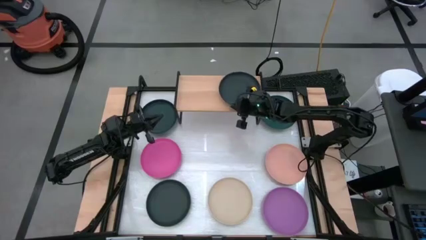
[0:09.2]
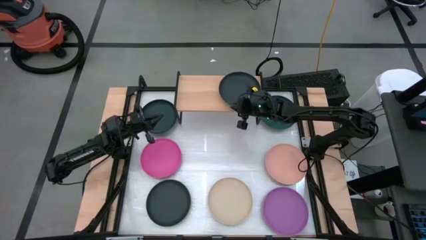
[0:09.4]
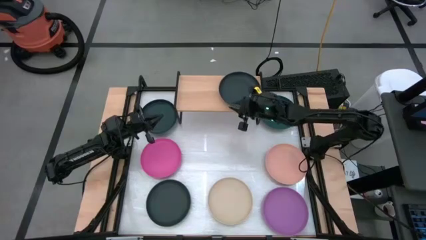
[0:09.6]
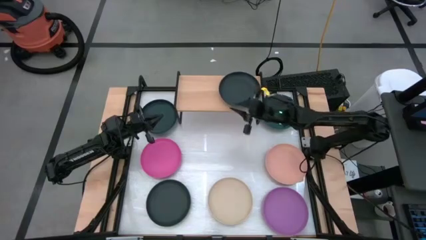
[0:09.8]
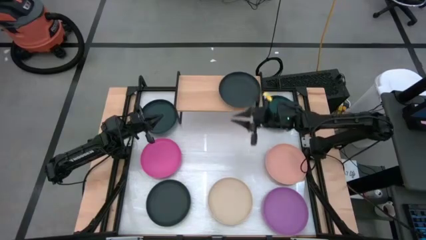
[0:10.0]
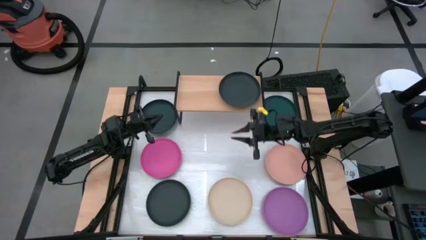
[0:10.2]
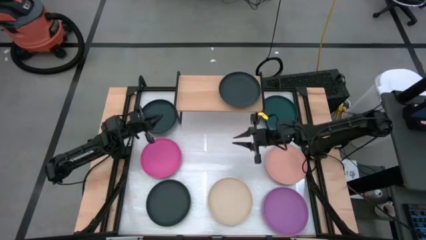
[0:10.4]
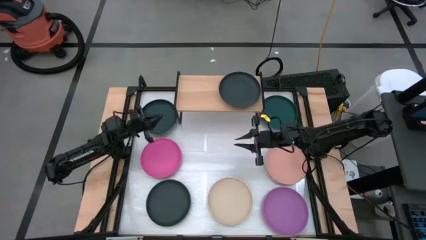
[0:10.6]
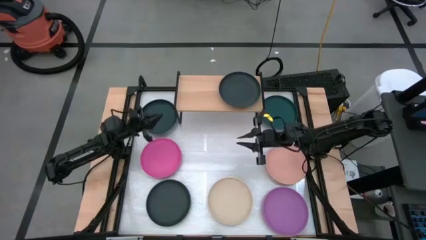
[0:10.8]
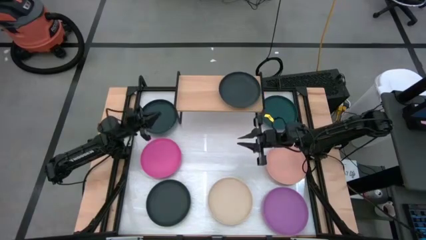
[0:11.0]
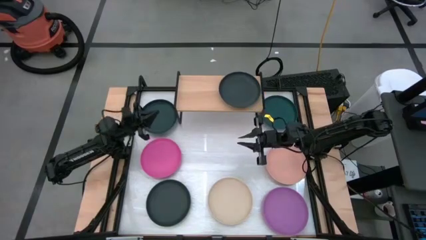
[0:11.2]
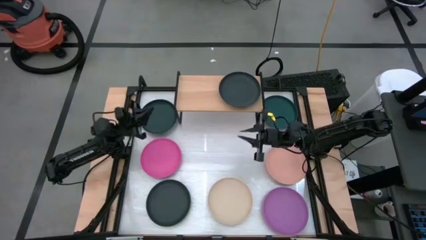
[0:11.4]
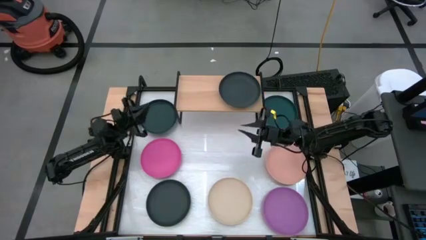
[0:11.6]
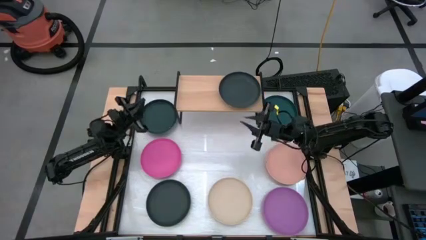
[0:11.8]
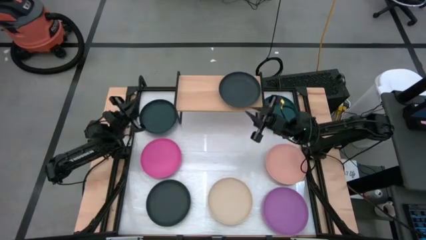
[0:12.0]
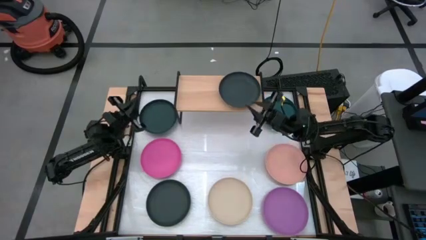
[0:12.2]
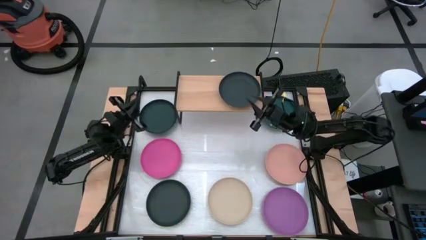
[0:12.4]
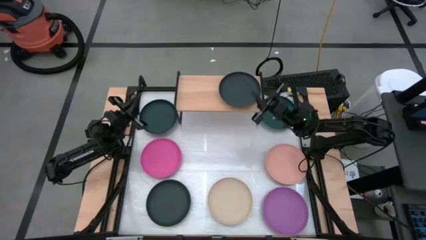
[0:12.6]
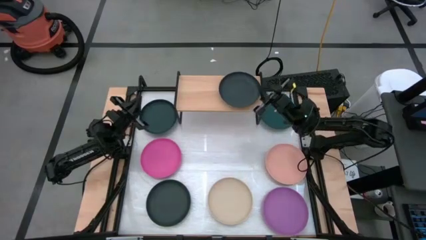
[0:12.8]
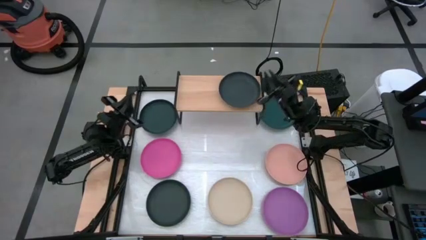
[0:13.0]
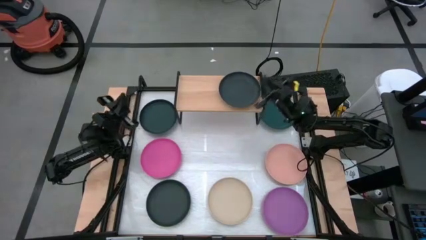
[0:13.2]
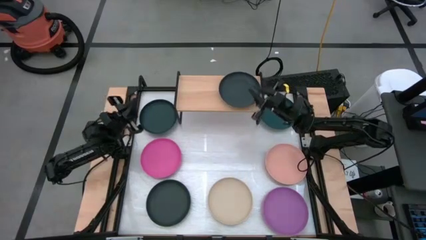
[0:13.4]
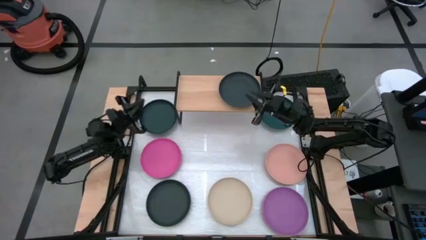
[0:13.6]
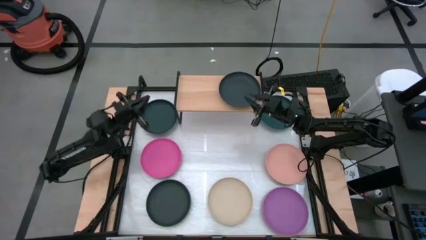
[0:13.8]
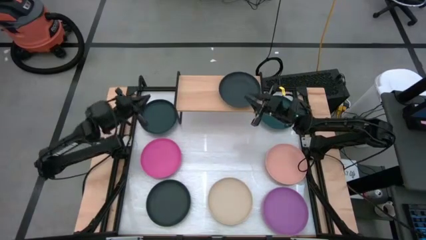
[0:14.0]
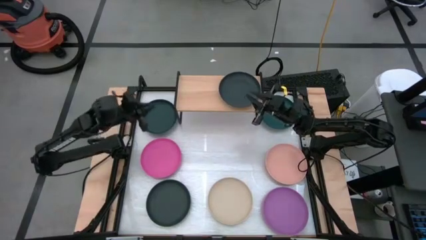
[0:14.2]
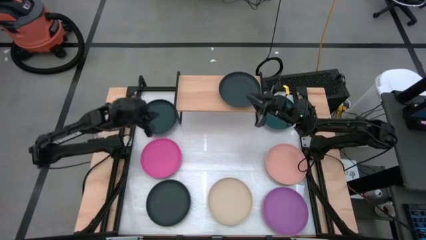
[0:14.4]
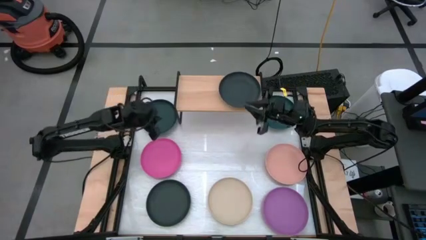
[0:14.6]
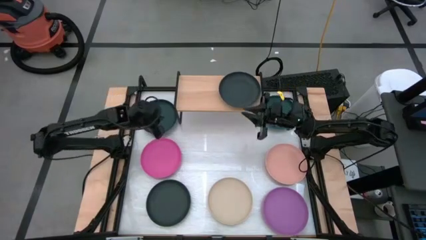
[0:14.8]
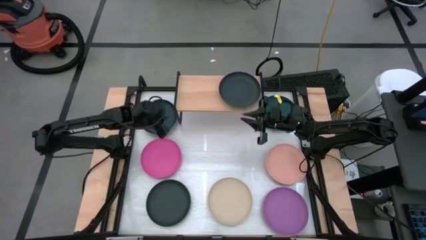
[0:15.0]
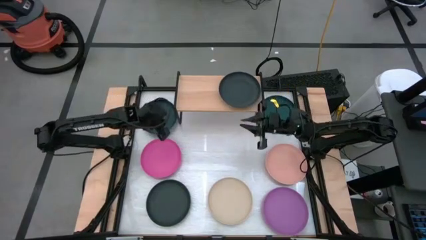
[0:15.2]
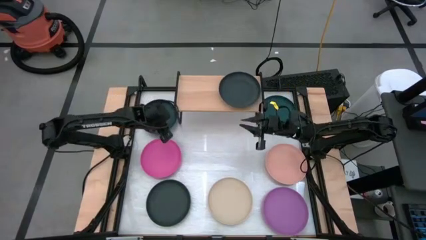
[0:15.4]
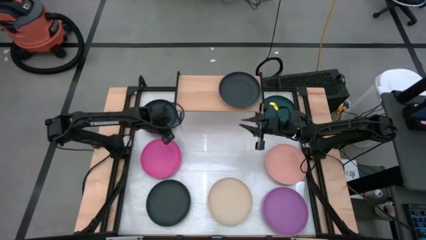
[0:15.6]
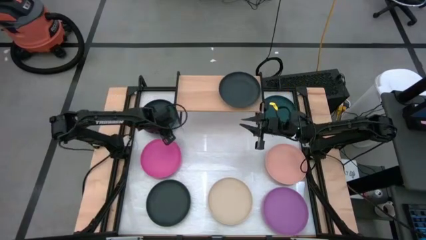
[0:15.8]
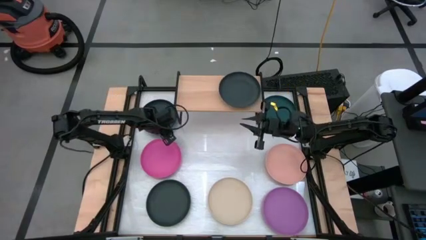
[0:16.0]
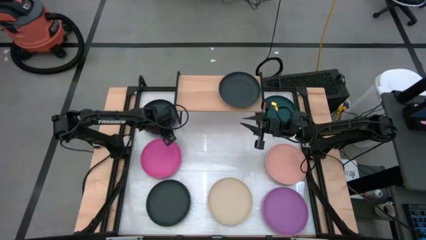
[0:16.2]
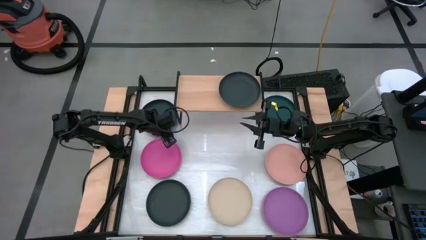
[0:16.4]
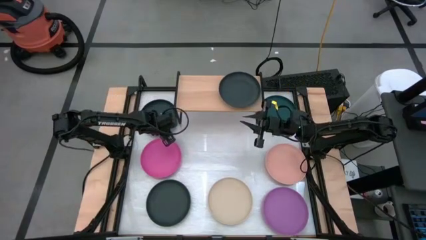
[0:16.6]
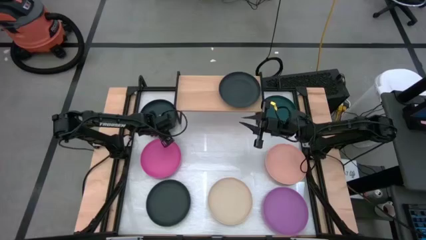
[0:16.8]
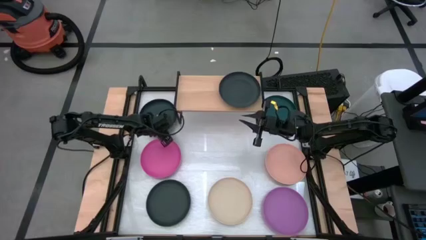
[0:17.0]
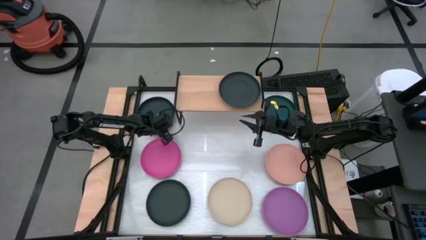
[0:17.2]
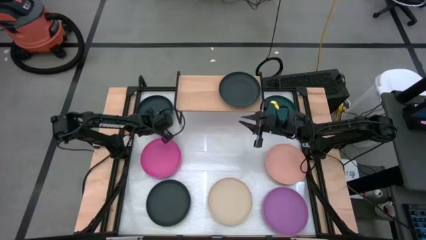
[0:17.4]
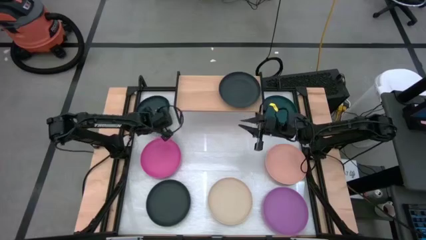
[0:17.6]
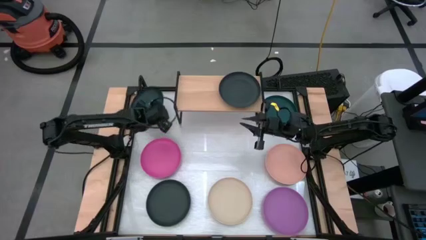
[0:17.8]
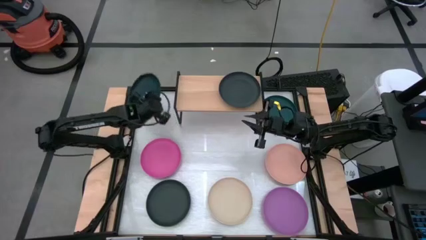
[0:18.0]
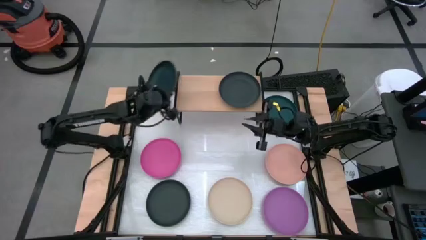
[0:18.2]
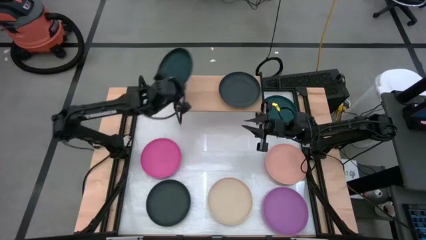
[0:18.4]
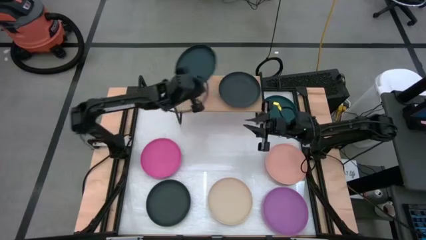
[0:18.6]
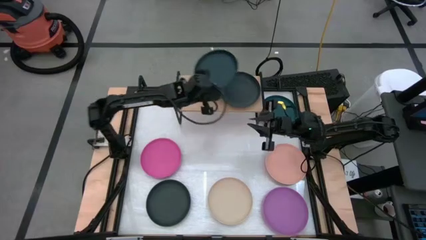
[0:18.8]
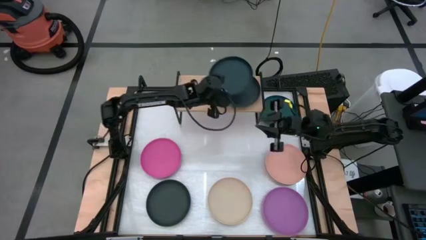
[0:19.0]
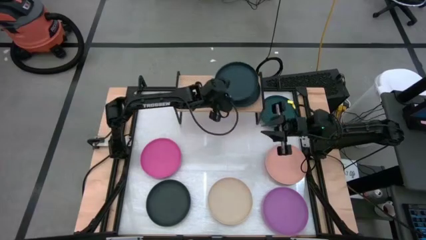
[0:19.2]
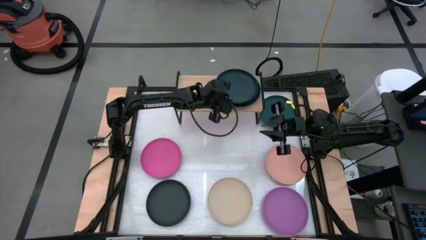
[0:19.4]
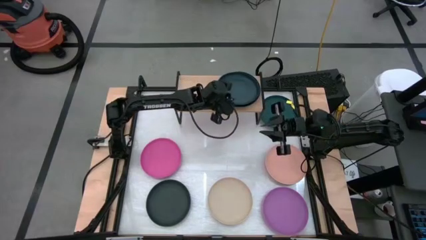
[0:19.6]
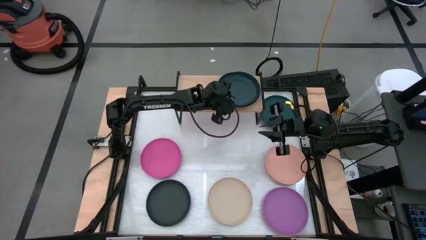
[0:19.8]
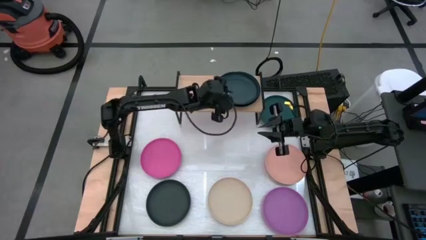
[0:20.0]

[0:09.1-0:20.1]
Task: Place and stack plates onto a shelf
Stack the left green plate on the black plate on the shelf

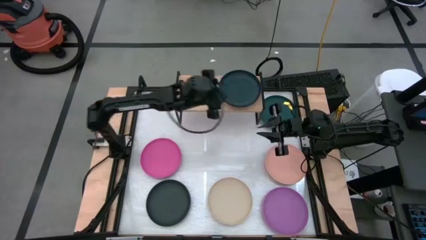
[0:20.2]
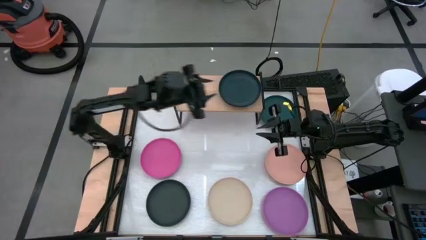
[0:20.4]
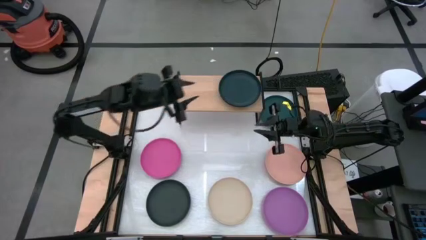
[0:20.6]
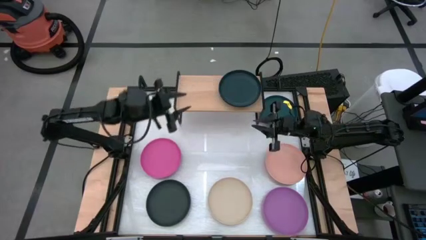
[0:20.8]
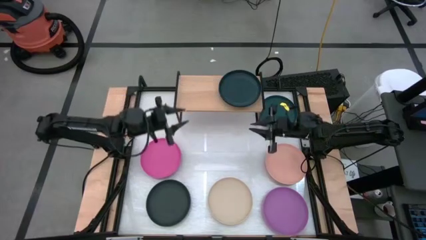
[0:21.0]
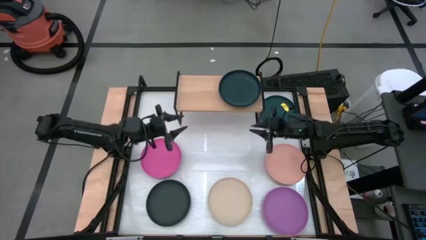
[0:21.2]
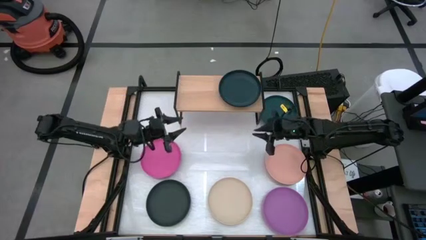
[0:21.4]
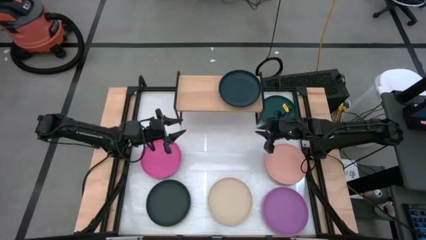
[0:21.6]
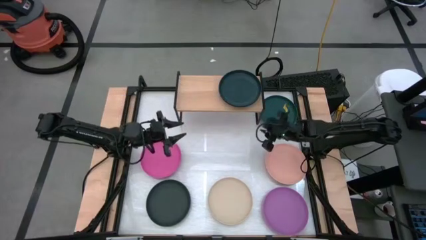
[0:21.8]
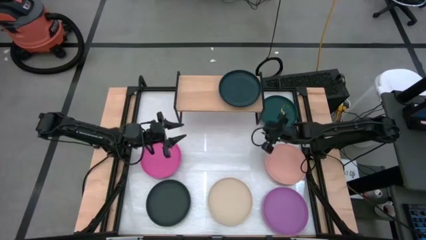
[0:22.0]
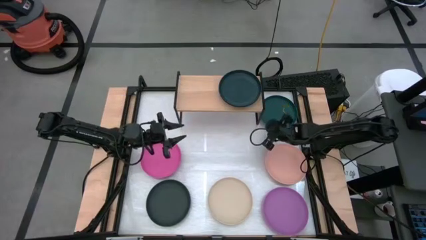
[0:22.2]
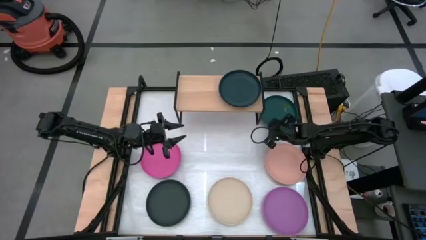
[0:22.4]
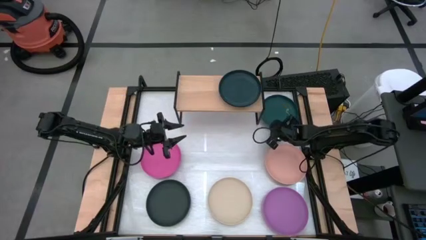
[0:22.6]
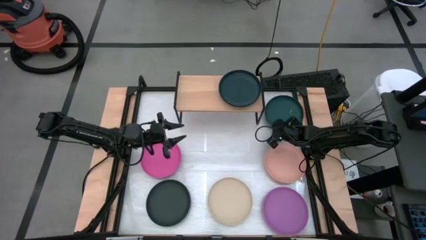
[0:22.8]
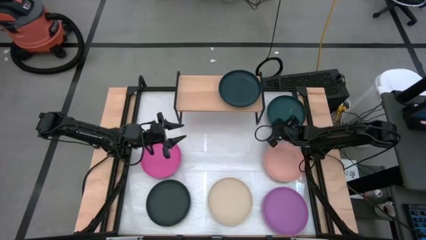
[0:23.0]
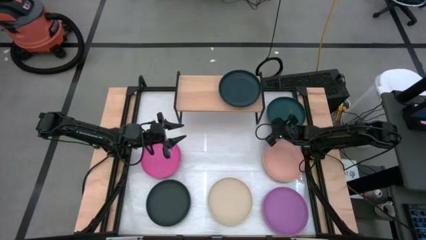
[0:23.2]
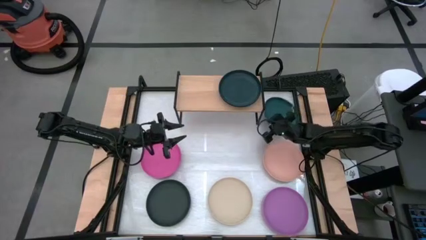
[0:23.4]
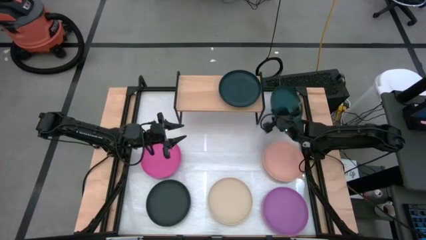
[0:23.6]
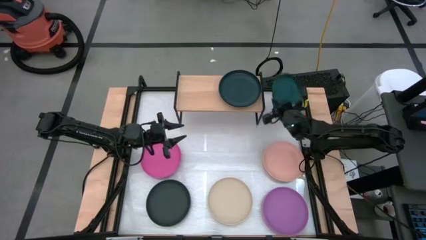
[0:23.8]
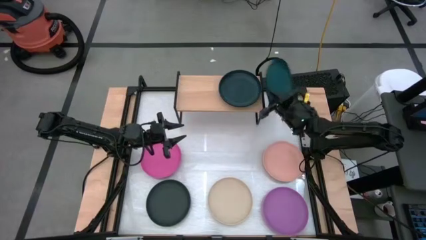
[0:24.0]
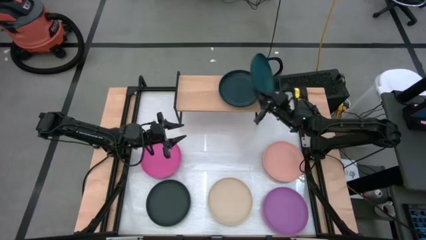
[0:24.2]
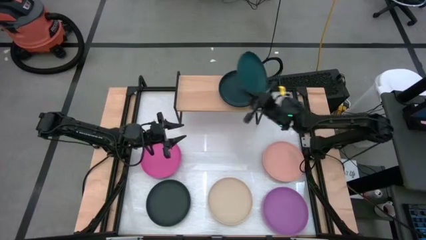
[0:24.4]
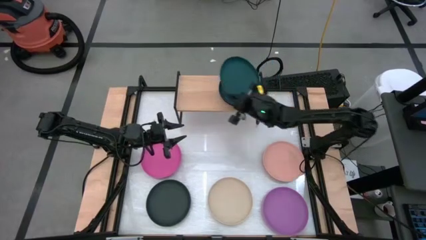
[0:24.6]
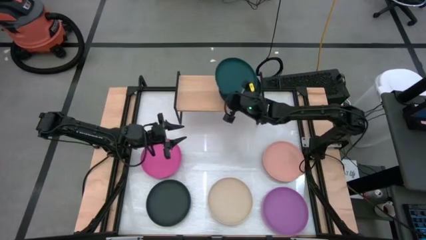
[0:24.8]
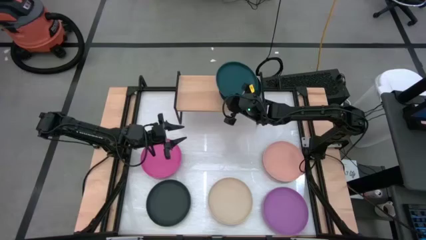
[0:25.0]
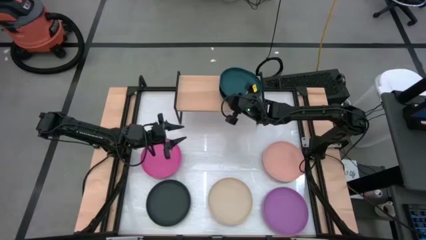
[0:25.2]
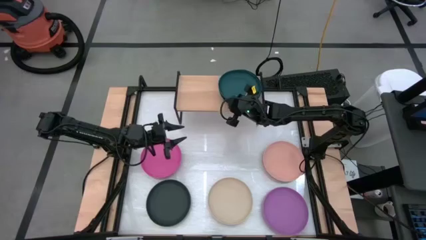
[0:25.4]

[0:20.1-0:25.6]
Stack the dark green plate on the dark green plate on the shelf
